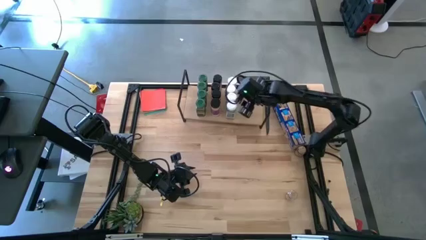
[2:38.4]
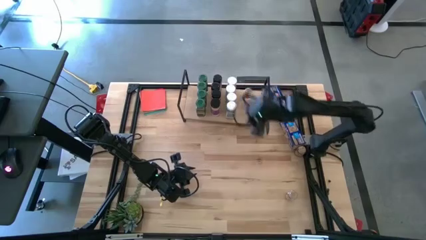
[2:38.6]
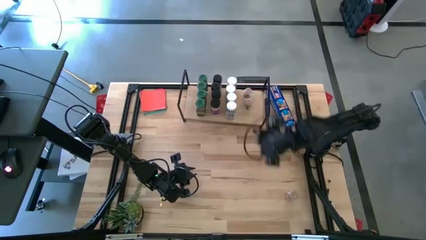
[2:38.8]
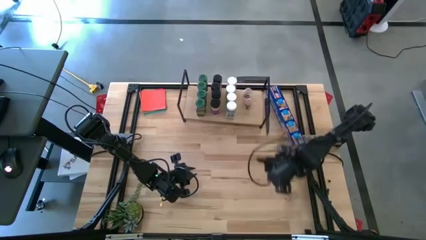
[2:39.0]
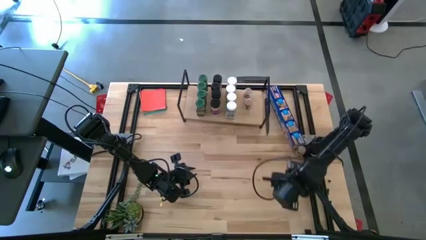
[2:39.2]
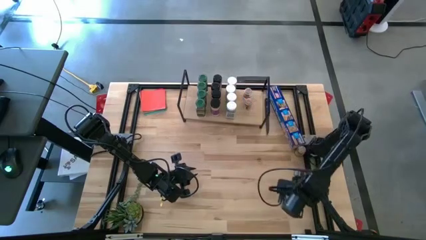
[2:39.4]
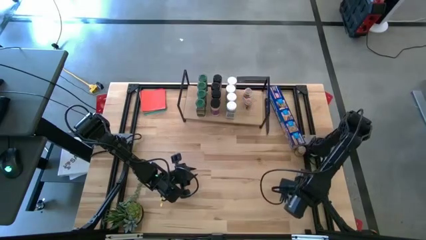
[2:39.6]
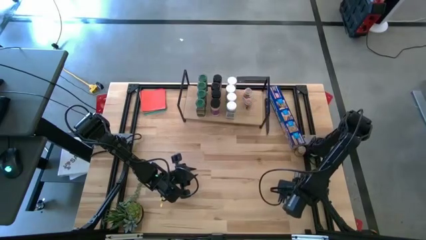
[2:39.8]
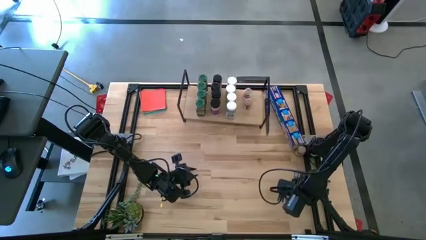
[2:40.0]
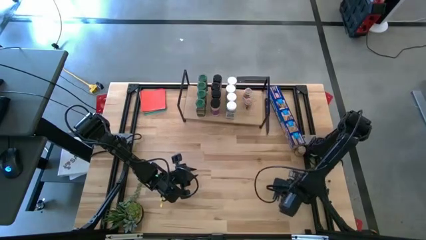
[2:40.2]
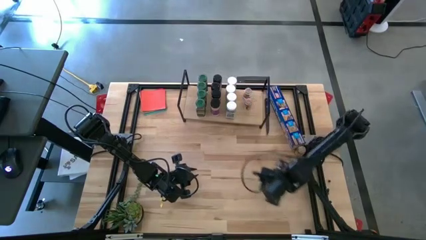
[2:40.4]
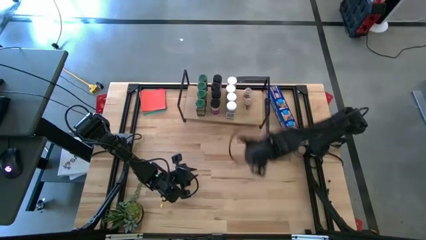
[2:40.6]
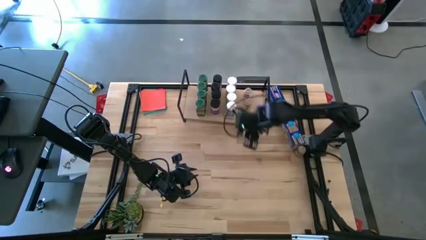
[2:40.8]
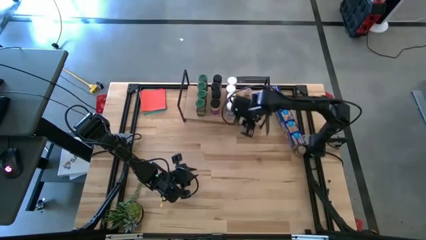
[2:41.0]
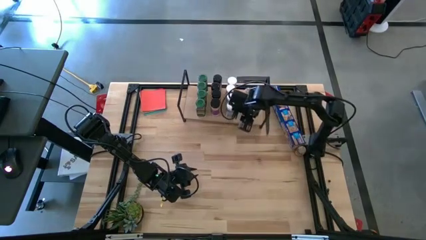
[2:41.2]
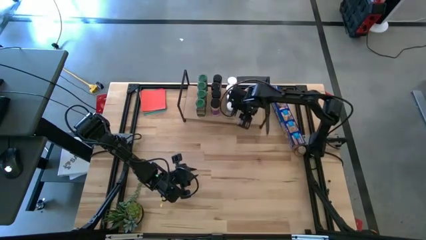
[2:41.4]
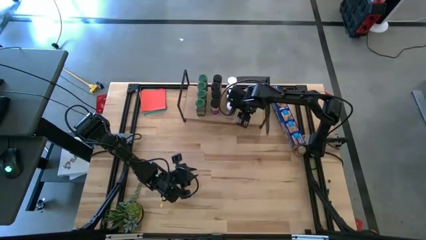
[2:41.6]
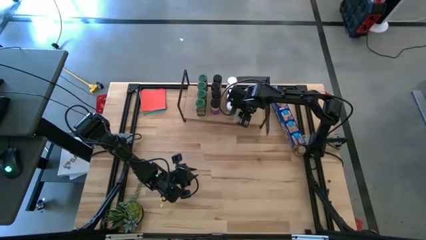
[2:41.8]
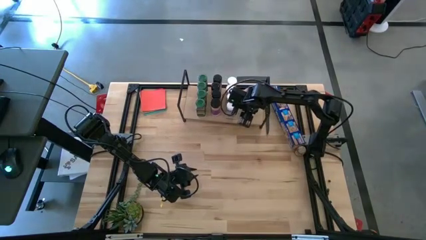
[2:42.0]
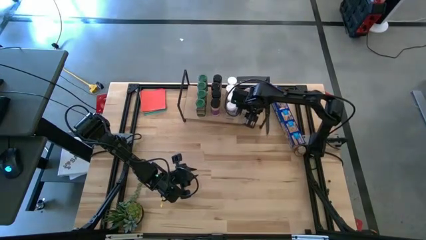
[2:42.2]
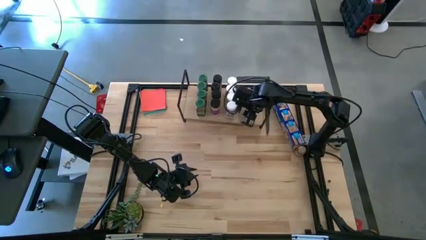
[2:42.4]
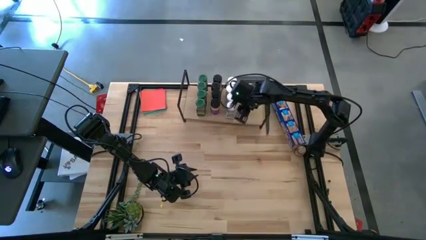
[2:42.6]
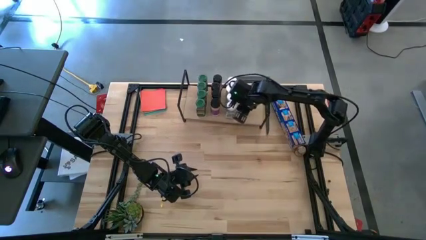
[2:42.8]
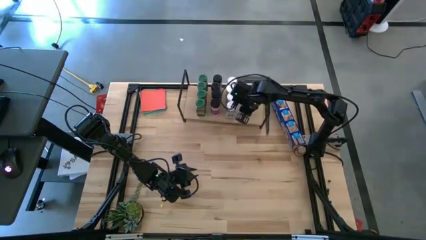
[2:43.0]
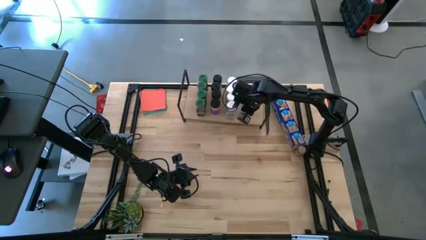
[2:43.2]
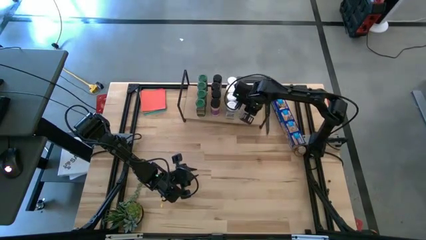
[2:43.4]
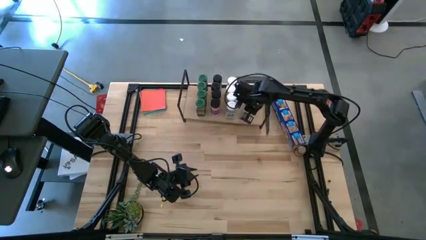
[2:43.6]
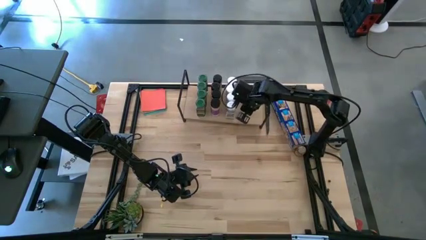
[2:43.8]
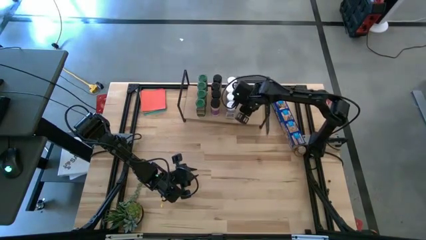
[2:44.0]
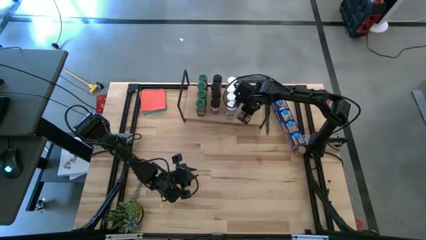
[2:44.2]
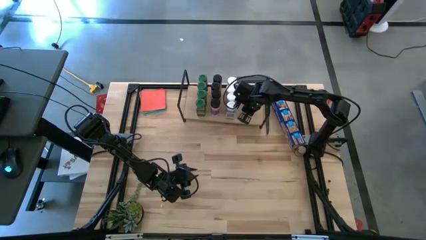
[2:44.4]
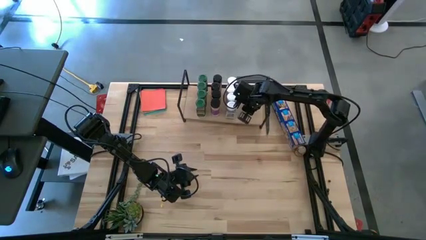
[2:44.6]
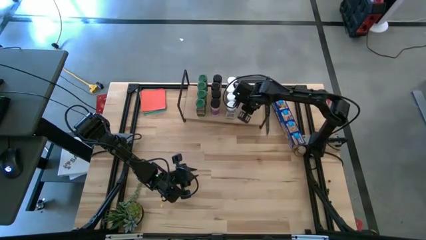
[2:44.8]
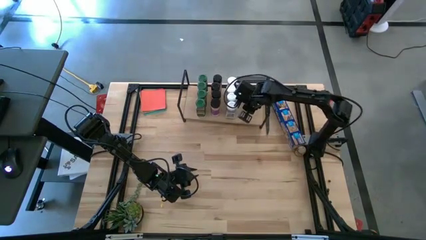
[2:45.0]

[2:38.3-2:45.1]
Task: Shelf spices
Put the bottom brown seasoning on the shelf aligned with the other brown seasoning bottles

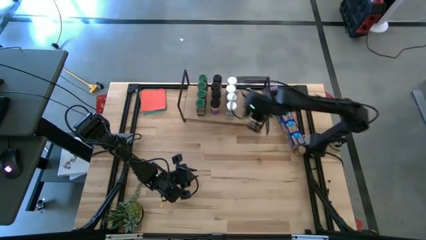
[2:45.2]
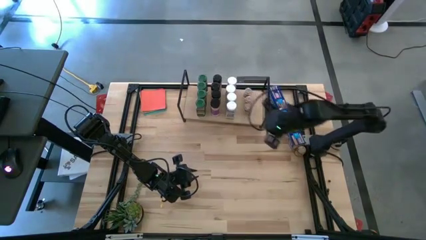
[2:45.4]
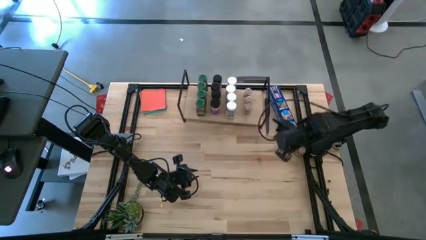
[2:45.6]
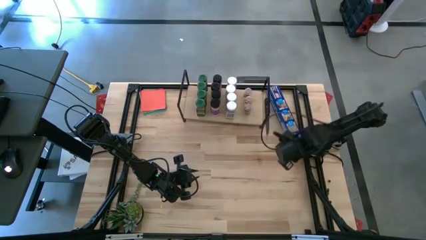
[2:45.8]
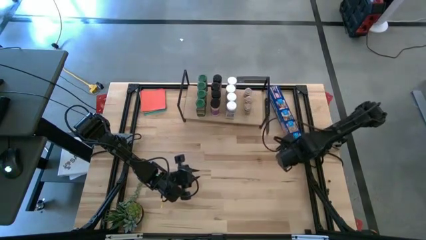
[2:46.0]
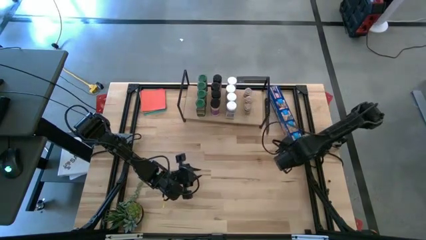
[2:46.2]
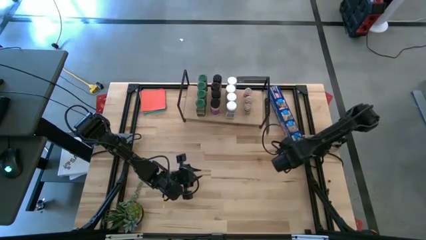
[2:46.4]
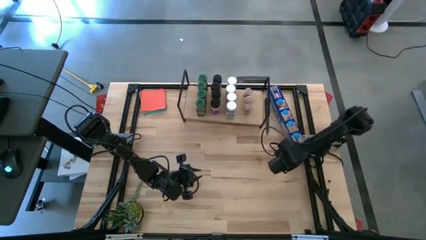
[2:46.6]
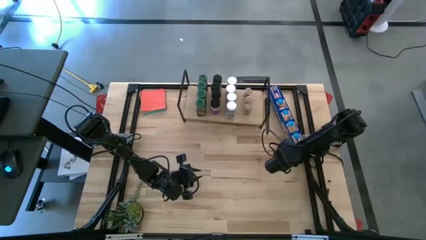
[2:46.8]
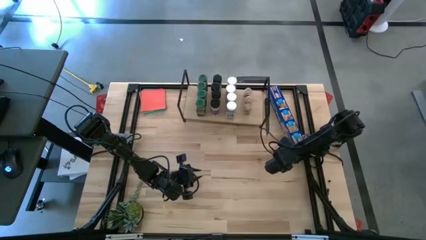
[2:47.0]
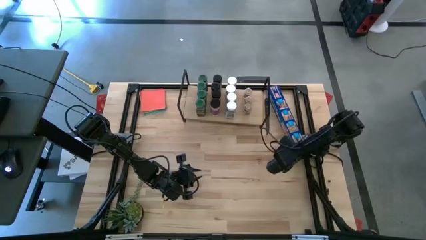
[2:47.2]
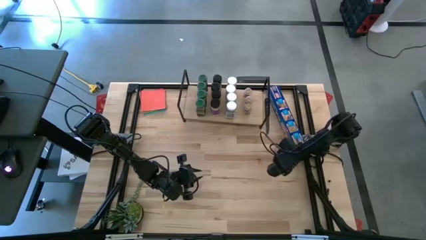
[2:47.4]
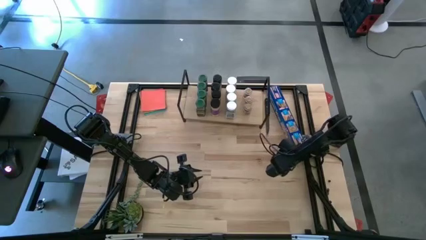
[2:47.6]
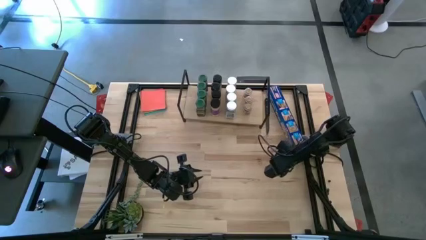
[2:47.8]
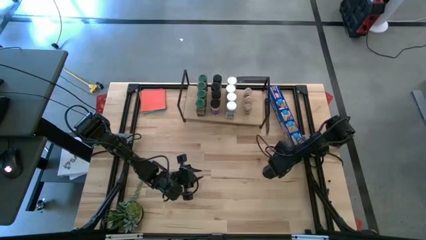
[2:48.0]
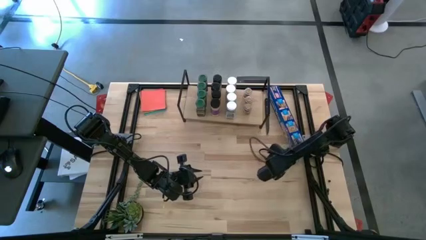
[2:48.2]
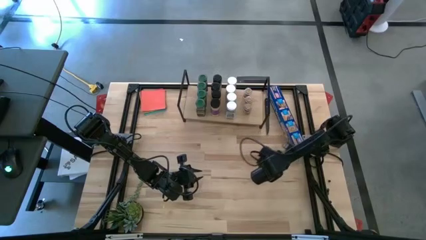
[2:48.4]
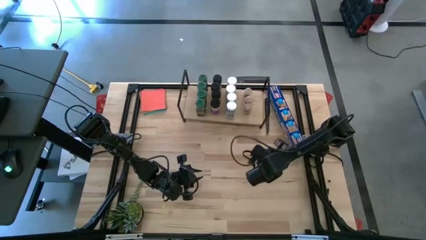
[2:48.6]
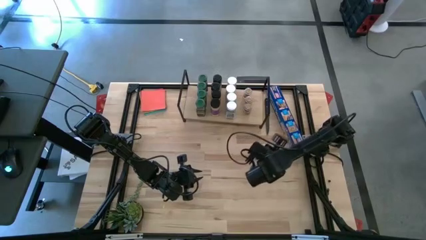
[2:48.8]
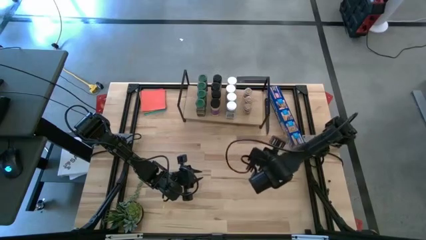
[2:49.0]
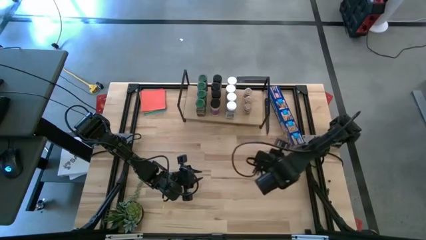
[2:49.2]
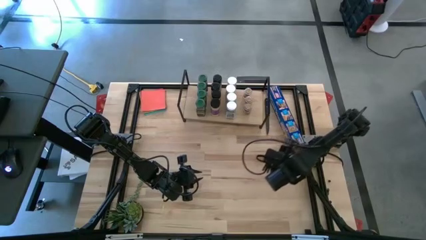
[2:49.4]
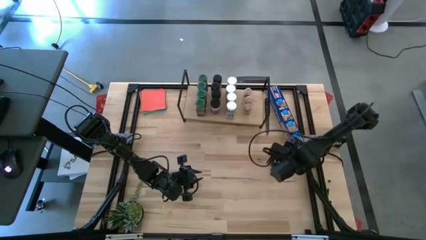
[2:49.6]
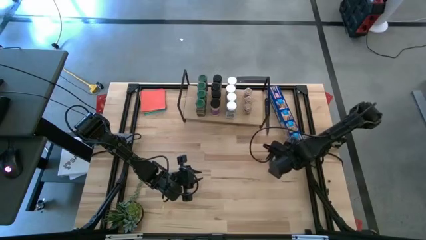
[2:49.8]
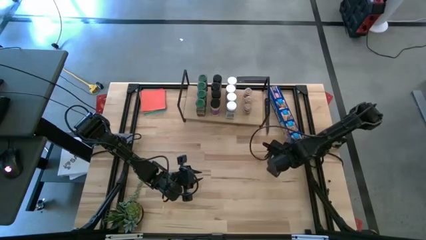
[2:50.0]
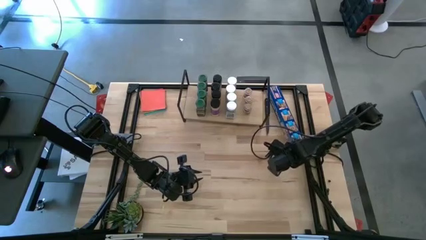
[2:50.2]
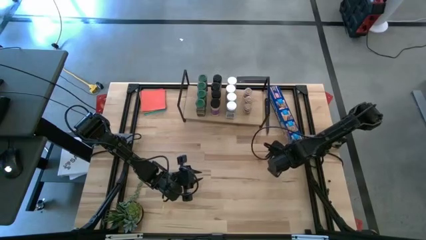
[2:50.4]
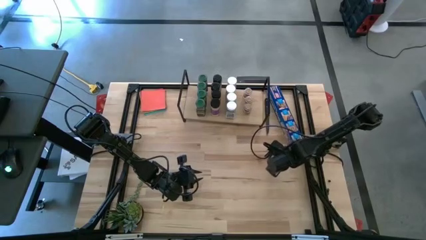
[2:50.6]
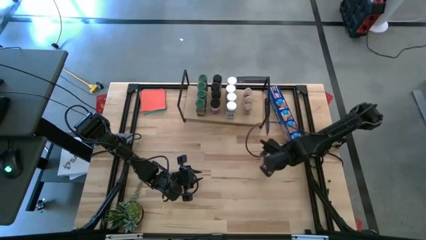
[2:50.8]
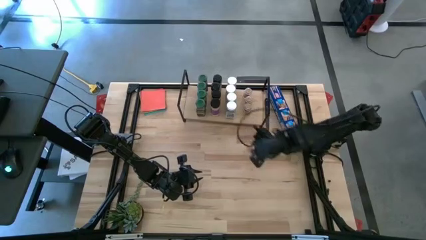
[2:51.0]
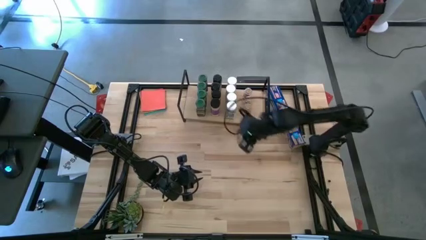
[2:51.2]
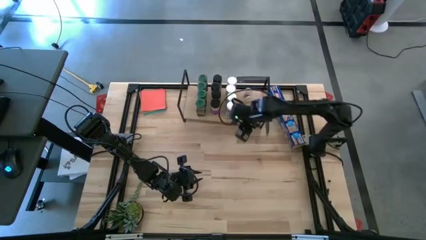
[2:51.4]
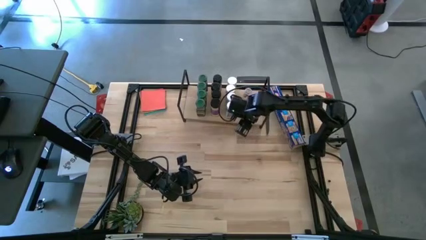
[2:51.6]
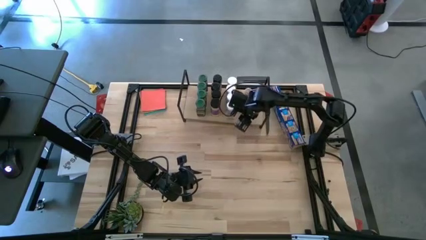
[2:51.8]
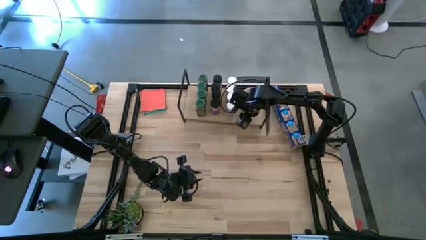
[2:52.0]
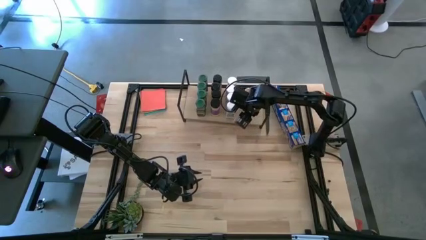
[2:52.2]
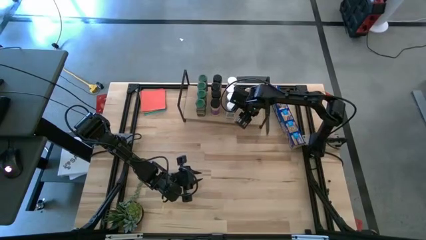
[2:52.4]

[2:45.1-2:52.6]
Put the brown seasoning bottle with the other brown seasoning bottle on the shelf

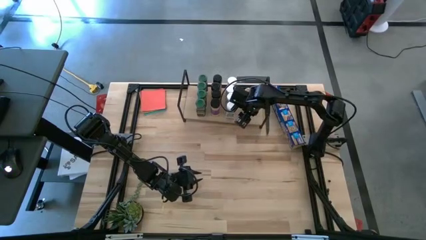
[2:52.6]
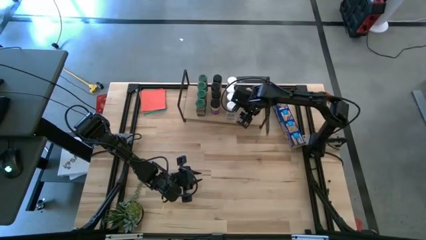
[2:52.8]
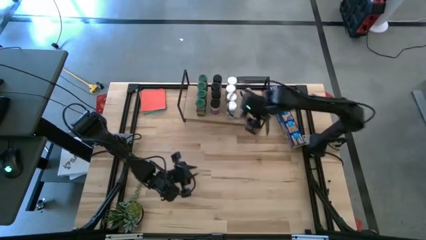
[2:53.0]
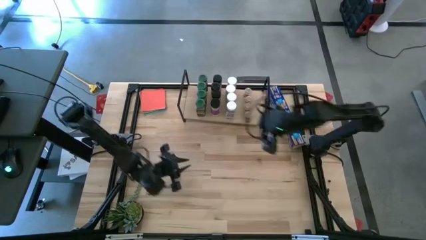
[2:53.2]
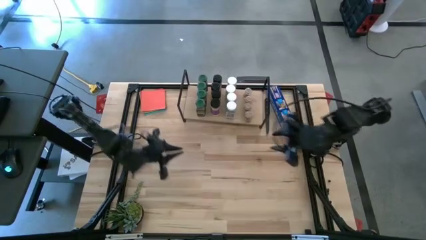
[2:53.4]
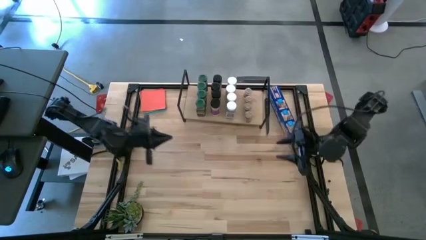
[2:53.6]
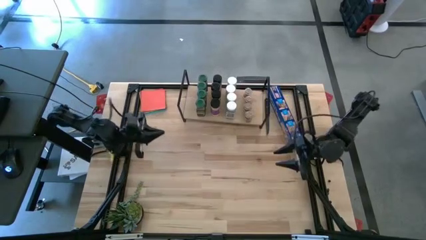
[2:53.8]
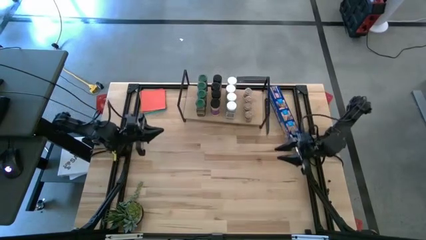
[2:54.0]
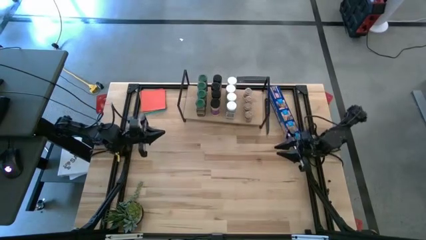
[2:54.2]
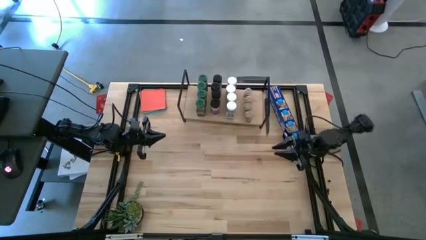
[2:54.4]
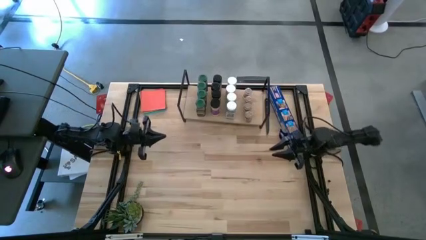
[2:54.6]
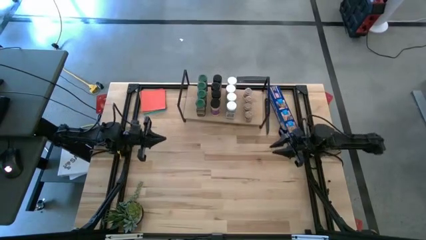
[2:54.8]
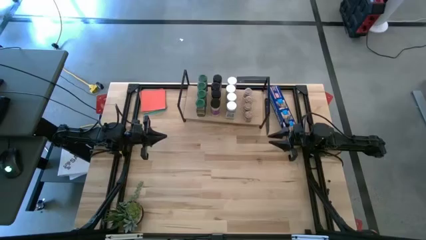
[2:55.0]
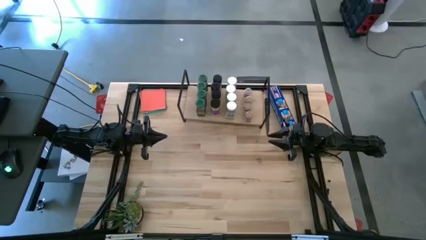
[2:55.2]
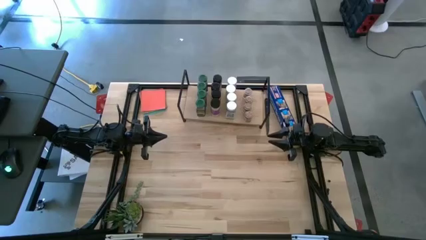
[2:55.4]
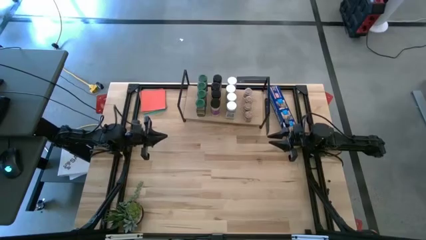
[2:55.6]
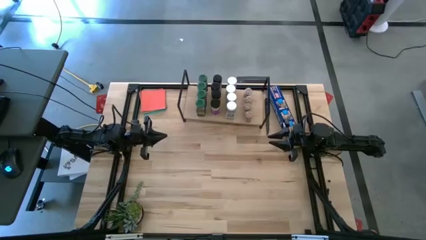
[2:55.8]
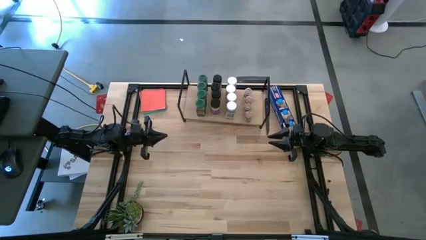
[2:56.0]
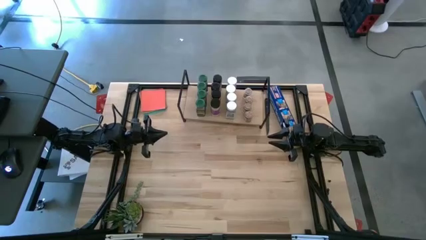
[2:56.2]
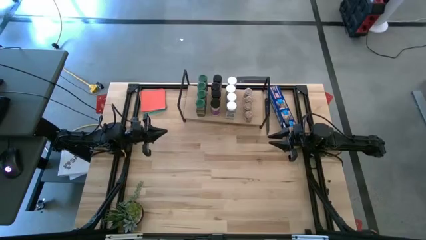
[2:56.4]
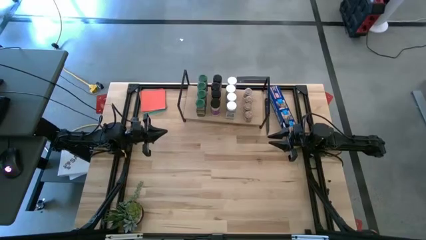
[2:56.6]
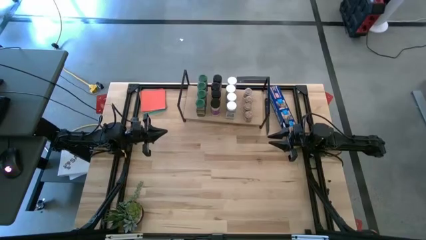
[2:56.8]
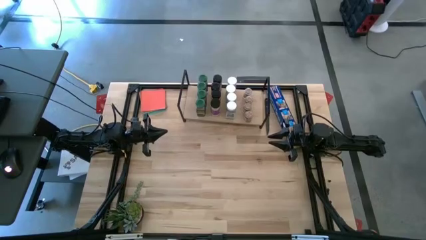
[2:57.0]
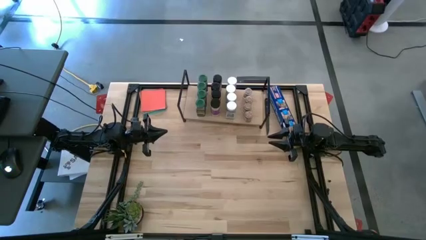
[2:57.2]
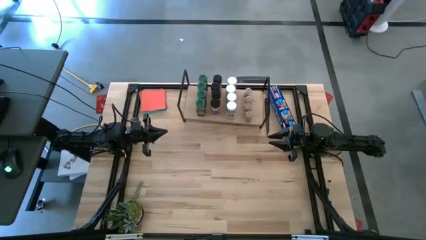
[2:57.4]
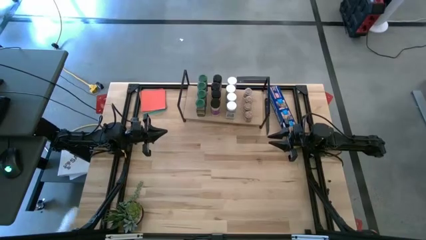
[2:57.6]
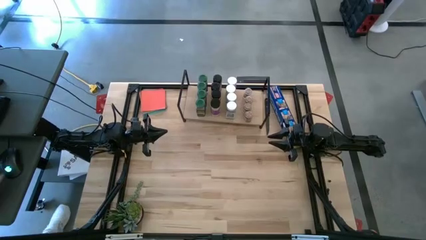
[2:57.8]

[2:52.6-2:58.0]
Return to Home Position
